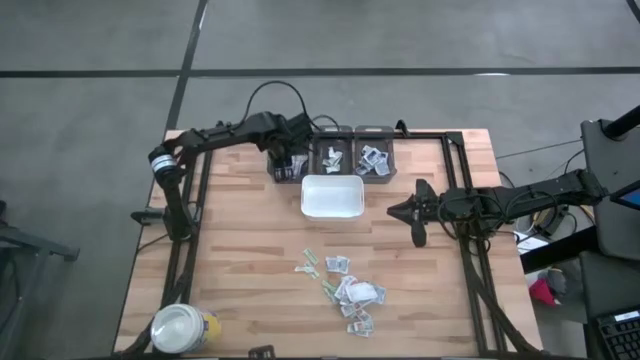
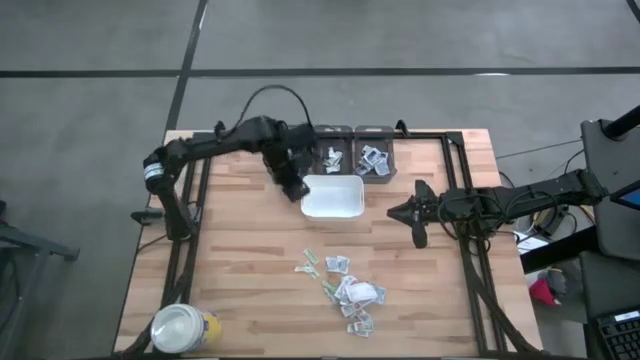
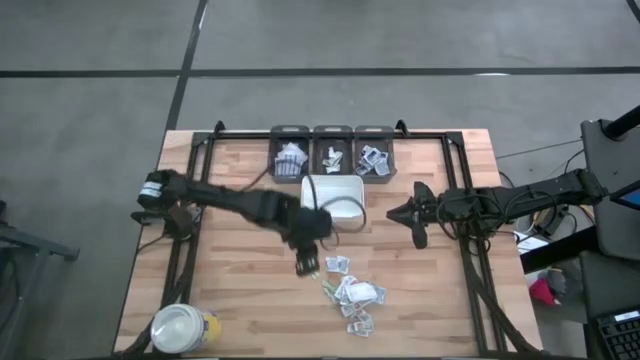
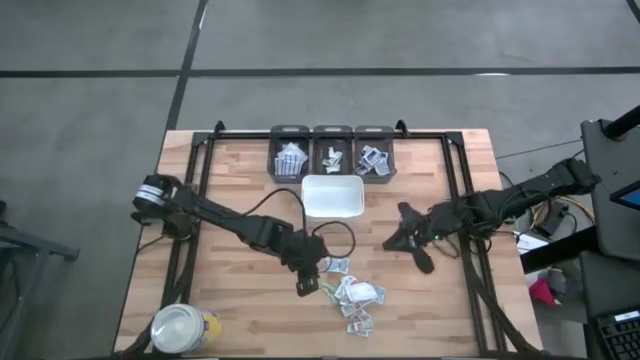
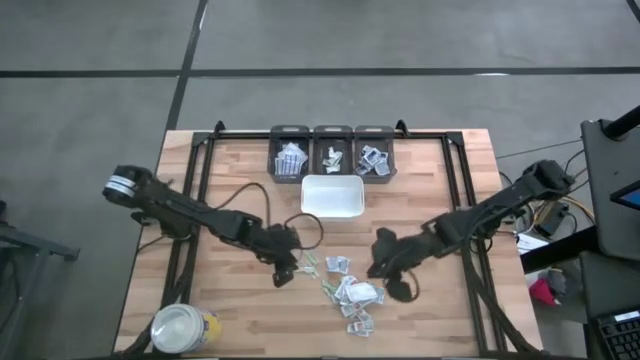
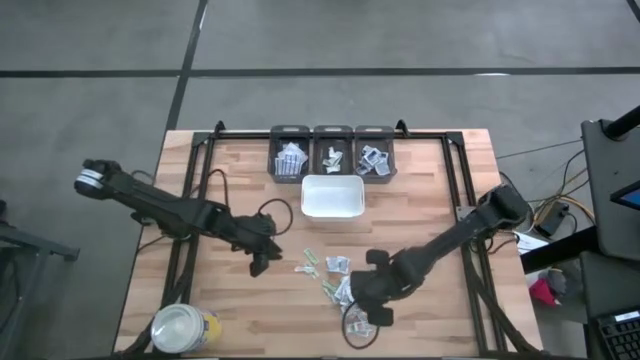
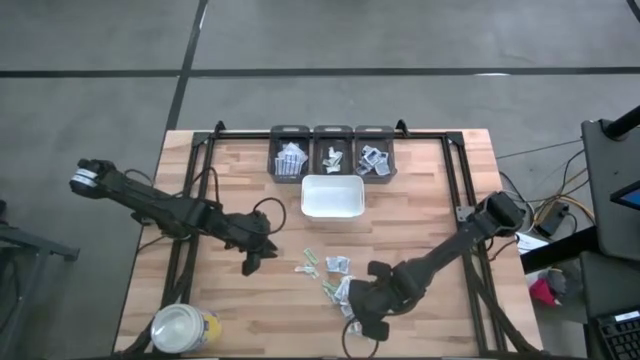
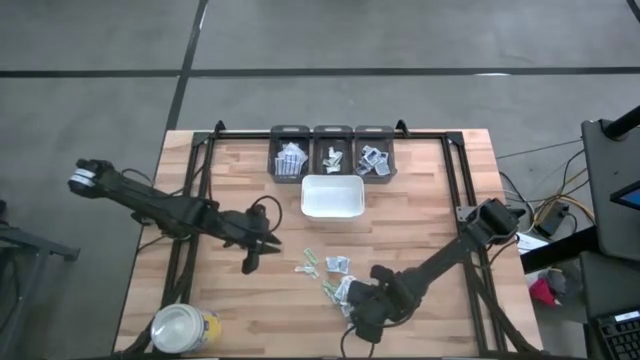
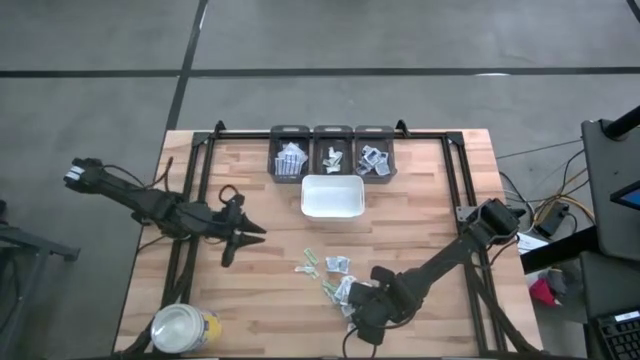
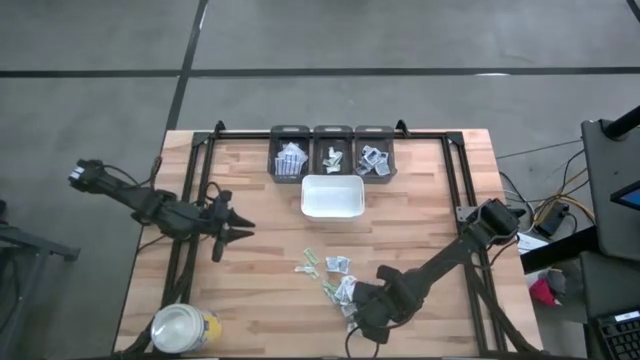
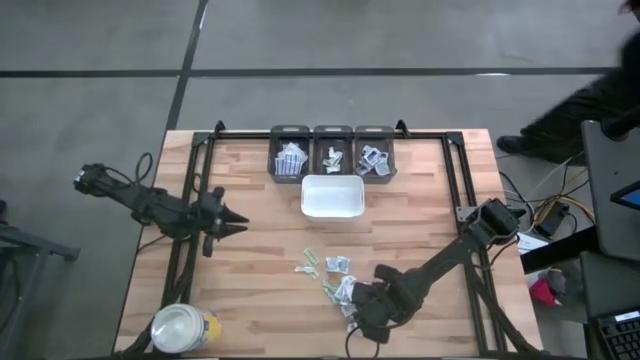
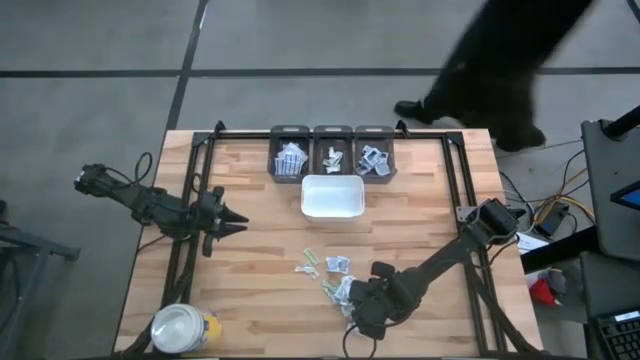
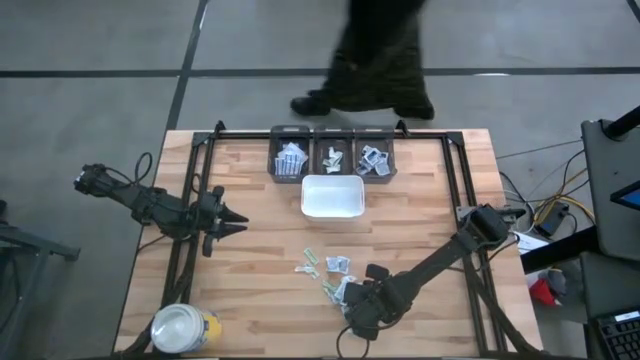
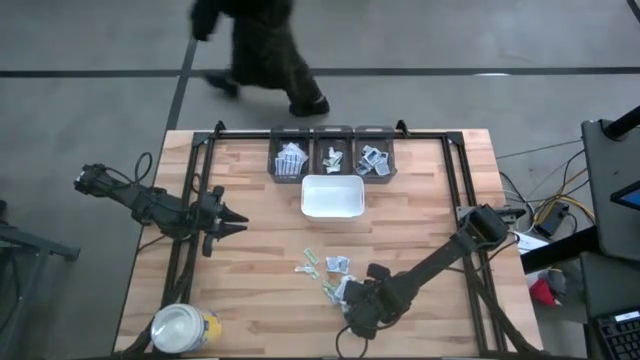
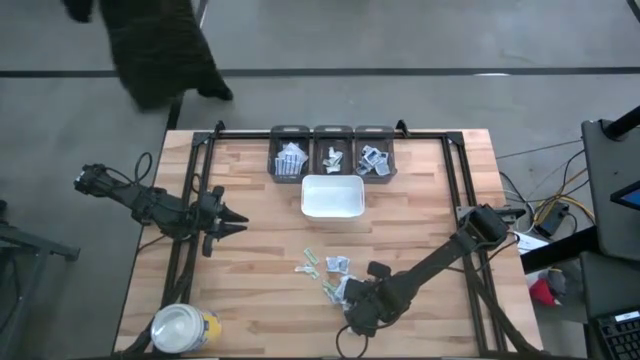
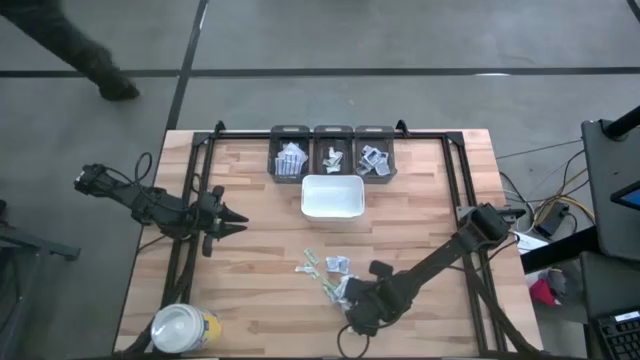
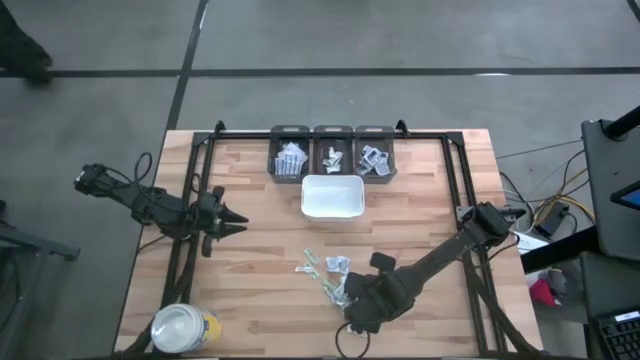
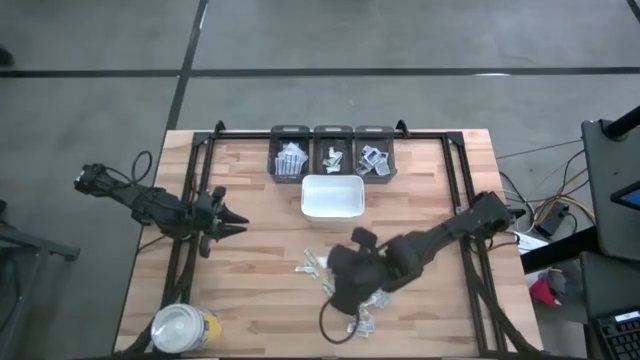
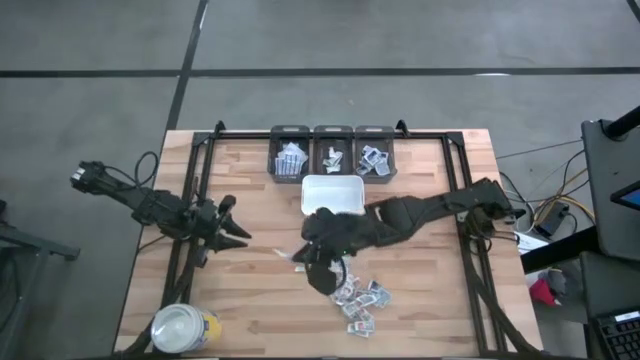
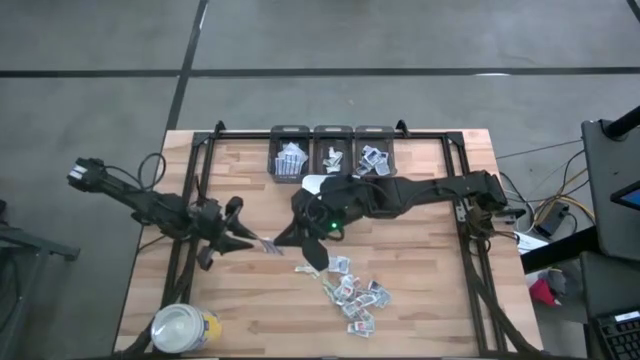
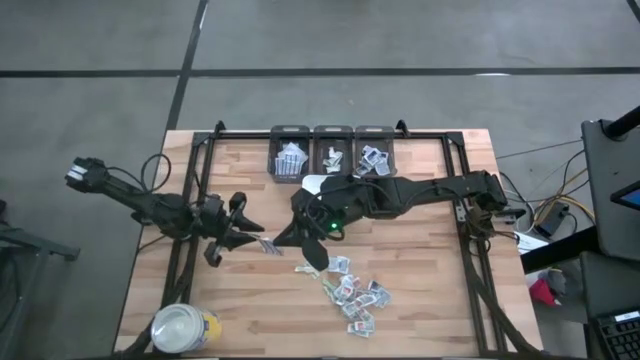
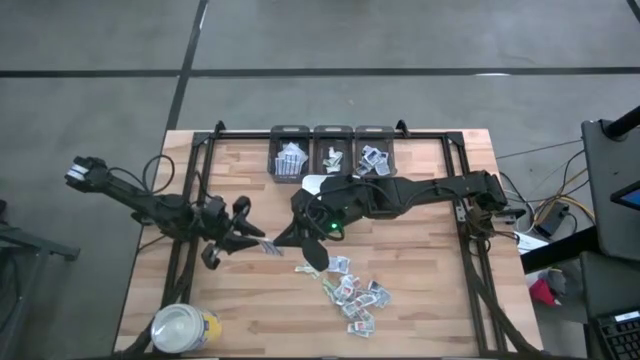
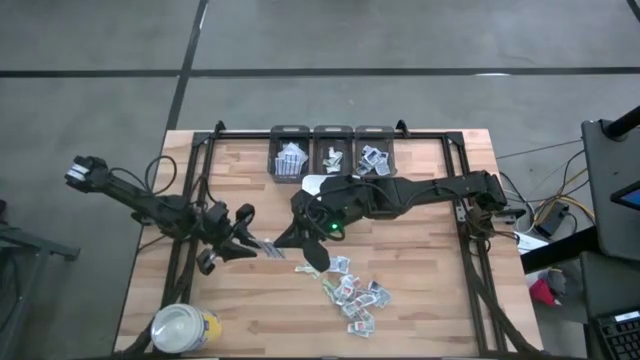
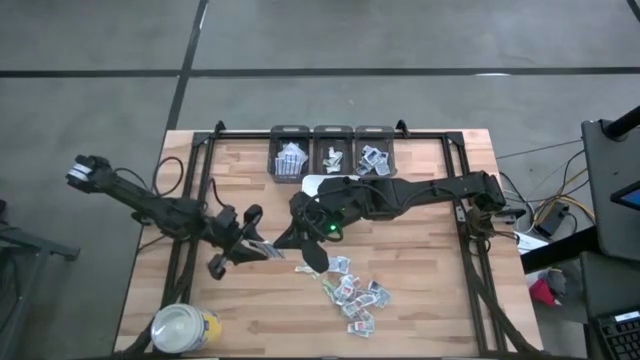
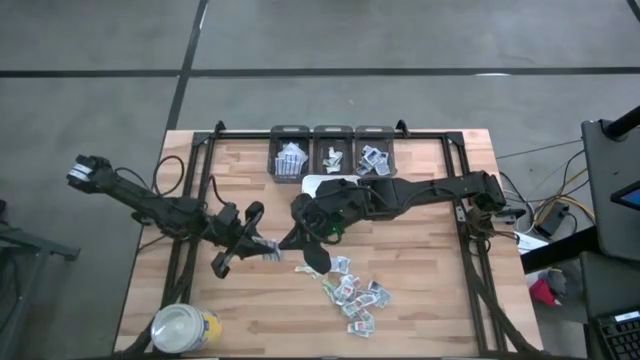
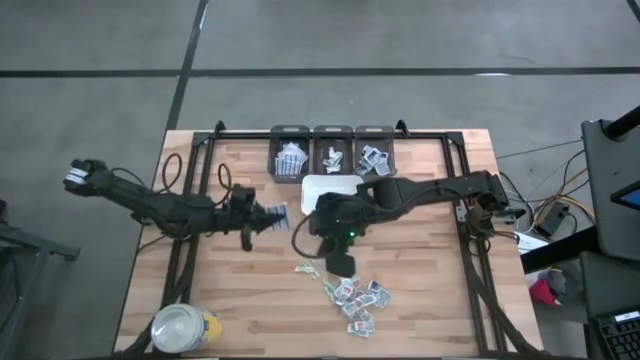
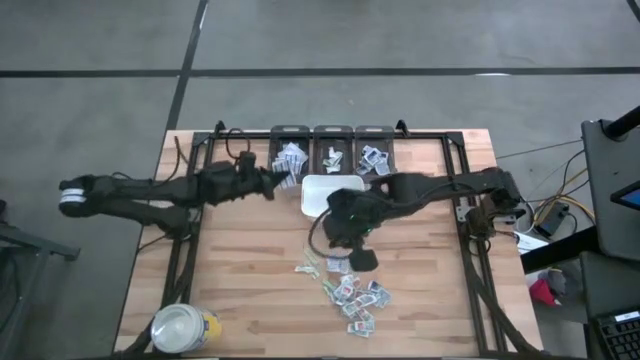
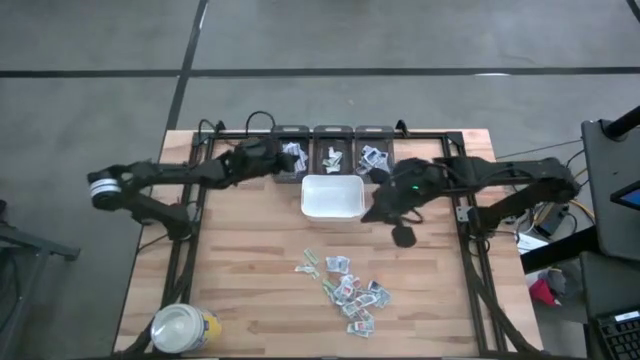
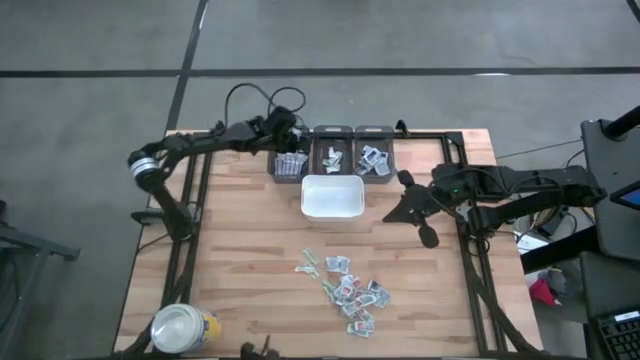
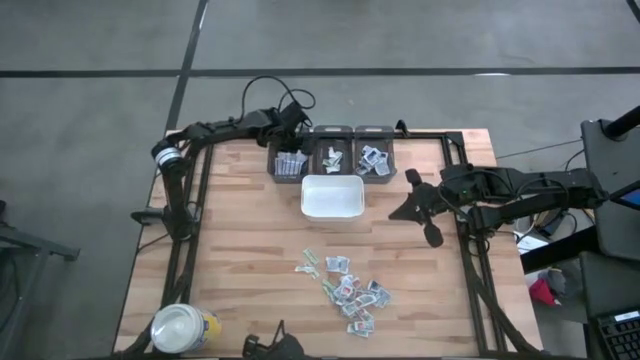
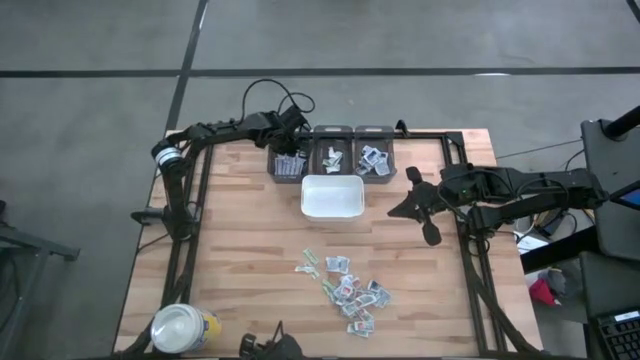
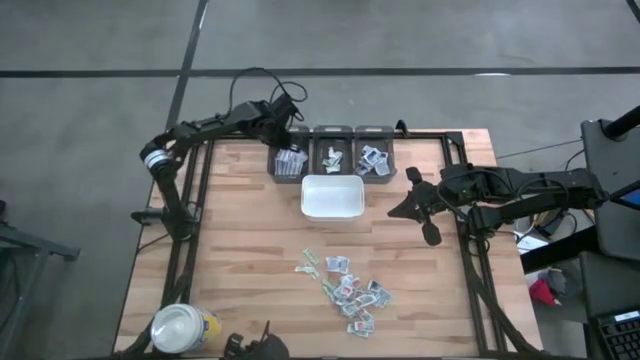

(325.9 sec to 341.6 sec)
Task: Pick & Place First Aid Supplies
Put the white fingertip band aid into the left black bin

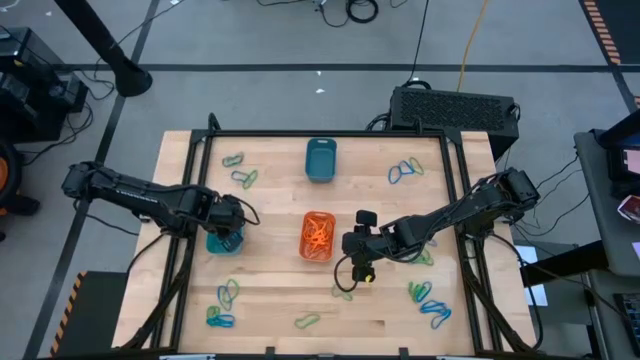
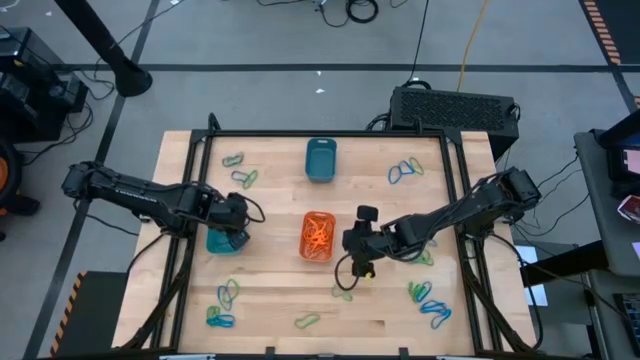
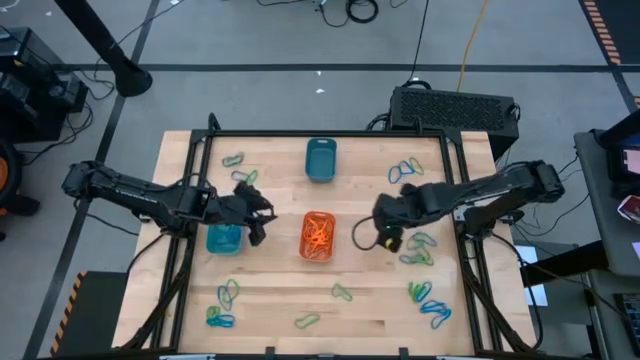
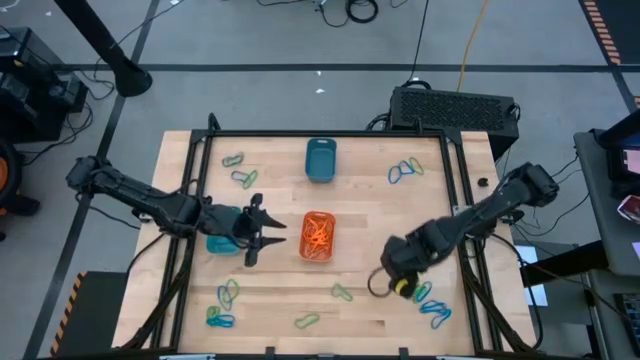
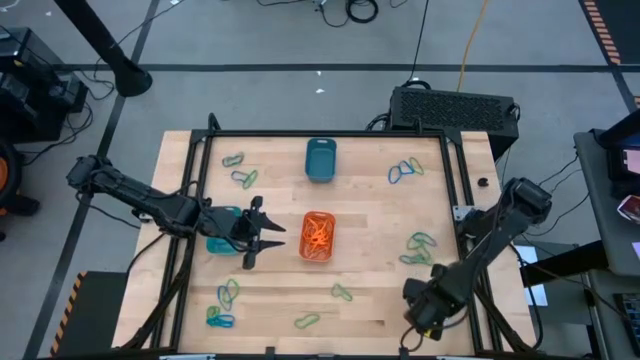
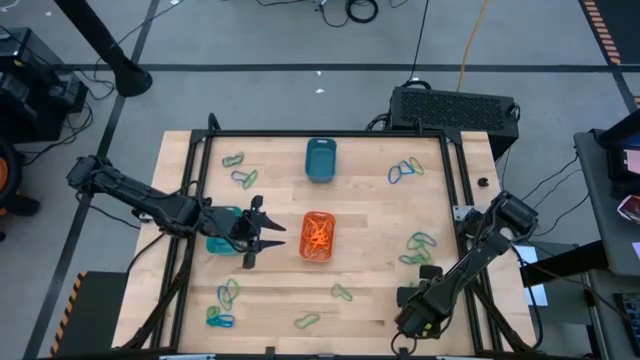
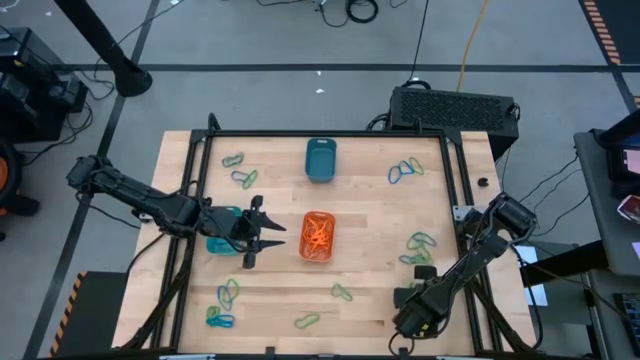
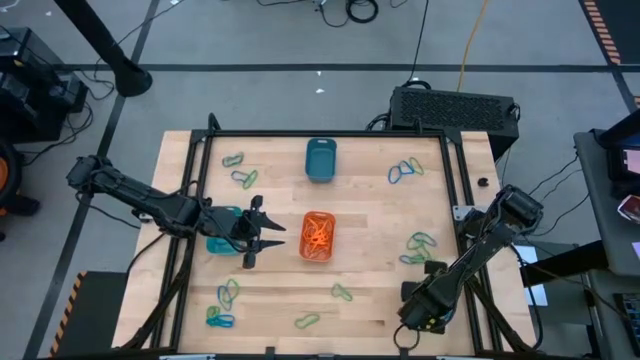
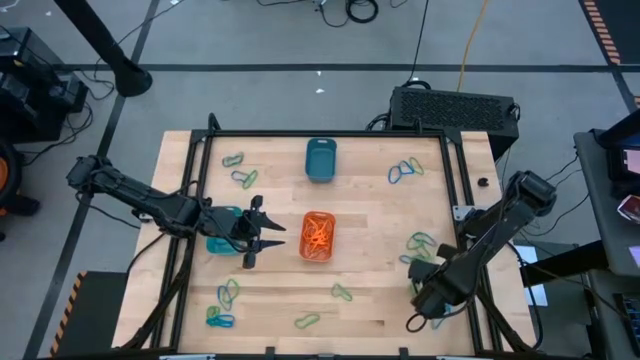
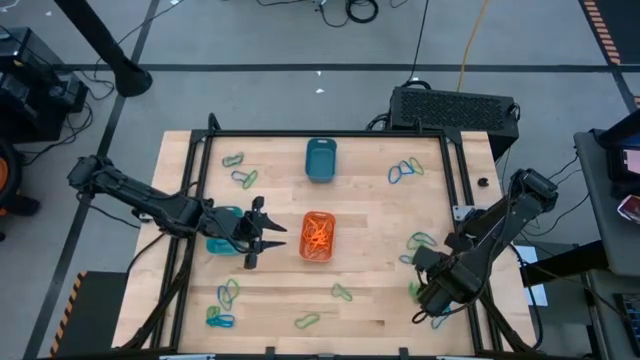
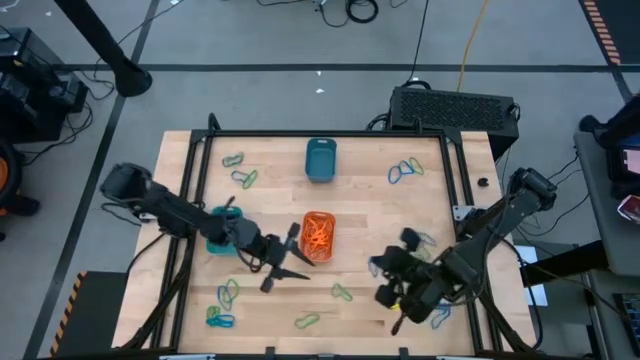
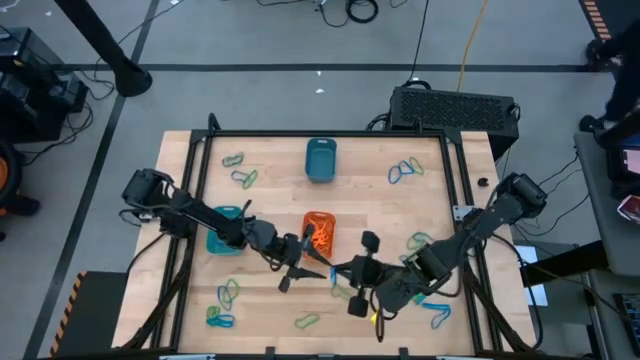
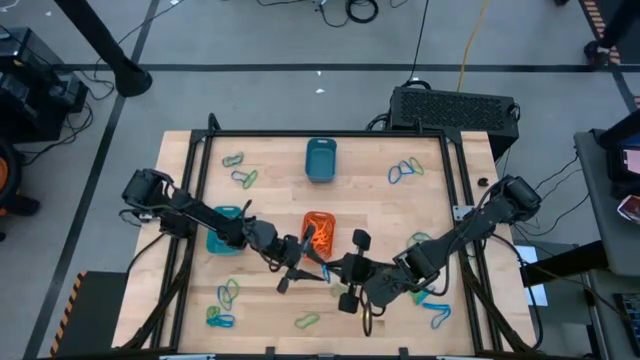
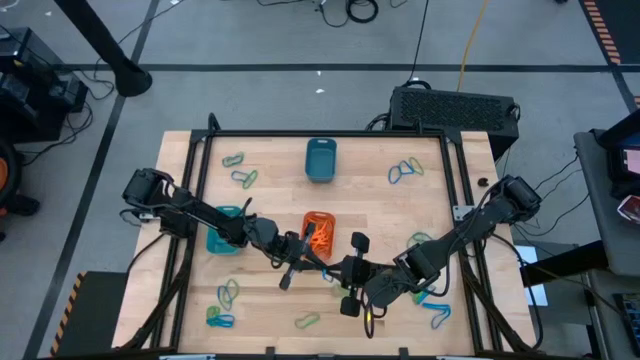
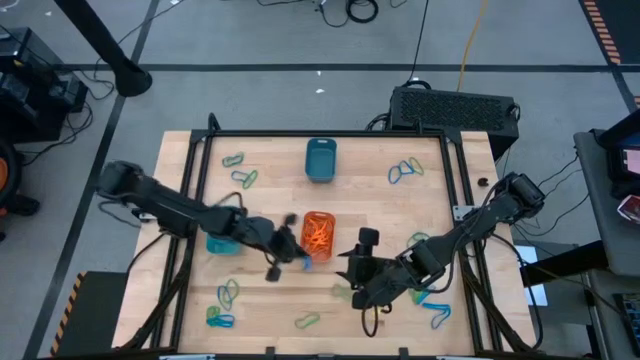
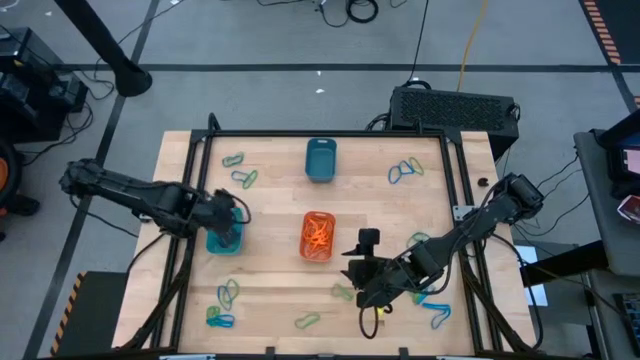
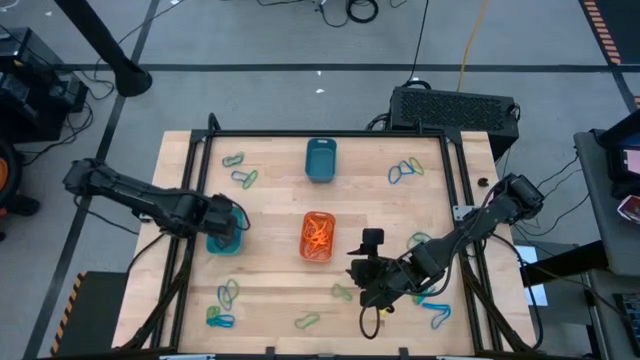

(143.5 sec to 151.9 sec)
Task: Sort rubber bands into baskets
Put the blue rubber band into the green bin
